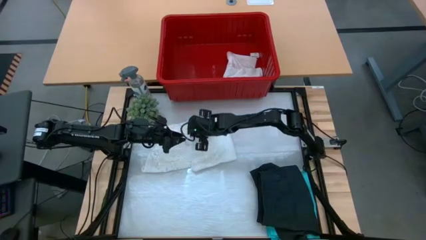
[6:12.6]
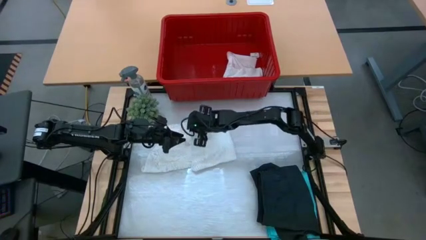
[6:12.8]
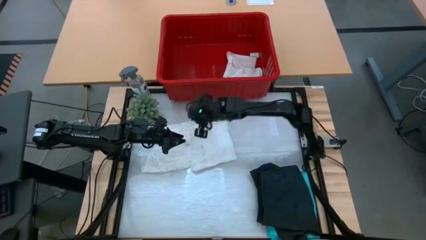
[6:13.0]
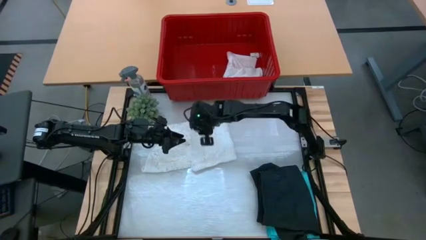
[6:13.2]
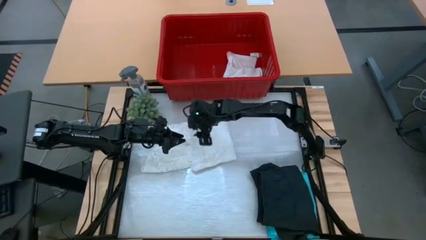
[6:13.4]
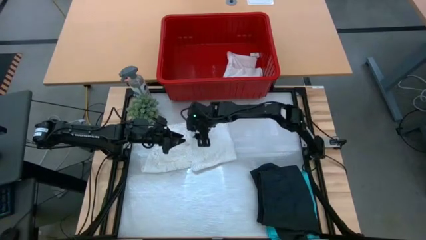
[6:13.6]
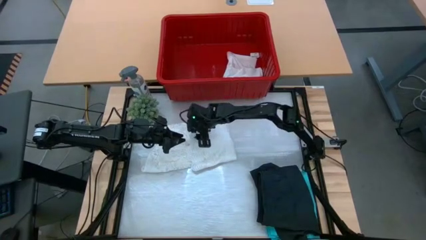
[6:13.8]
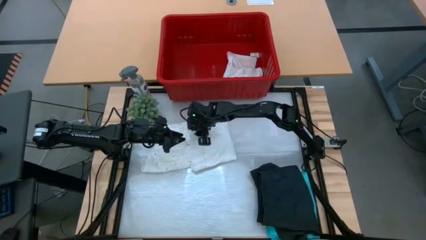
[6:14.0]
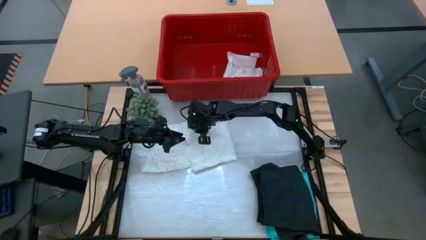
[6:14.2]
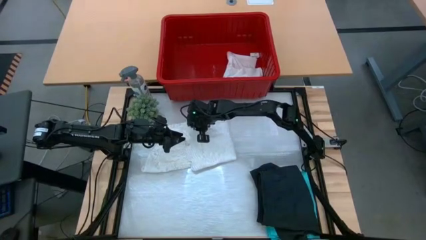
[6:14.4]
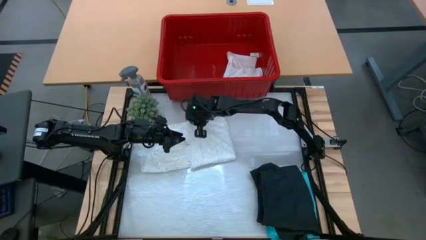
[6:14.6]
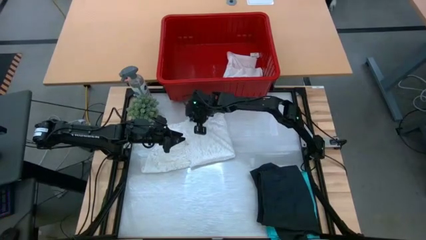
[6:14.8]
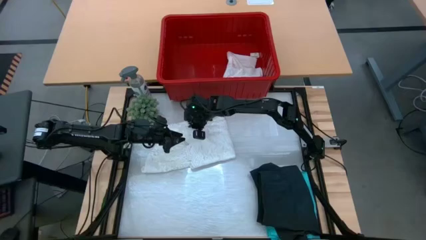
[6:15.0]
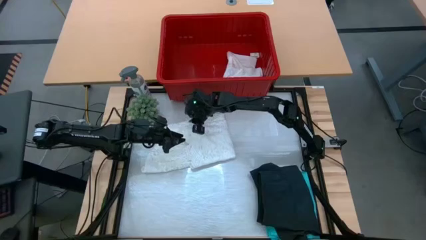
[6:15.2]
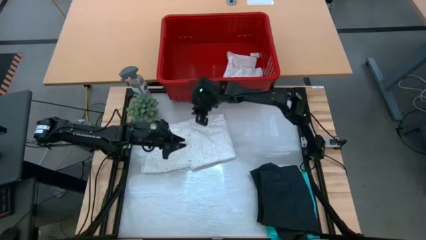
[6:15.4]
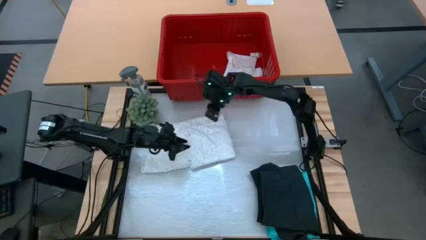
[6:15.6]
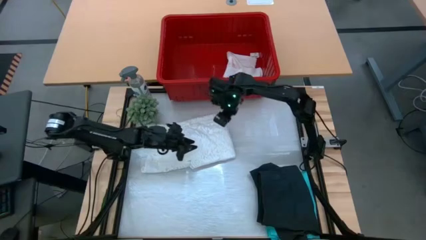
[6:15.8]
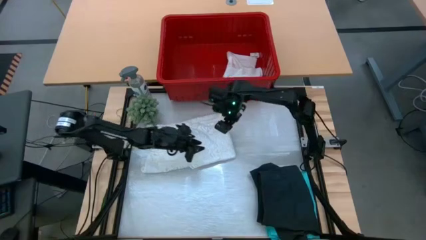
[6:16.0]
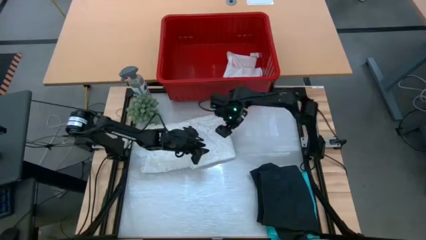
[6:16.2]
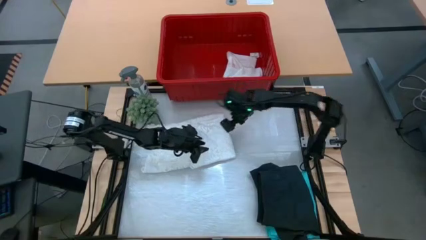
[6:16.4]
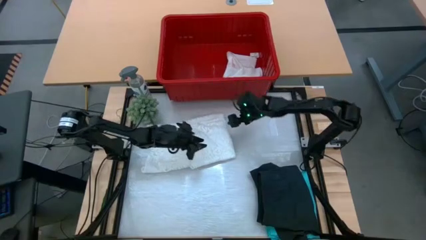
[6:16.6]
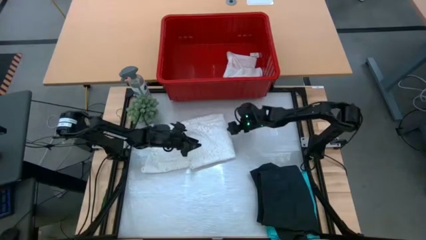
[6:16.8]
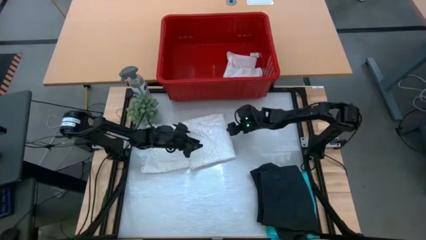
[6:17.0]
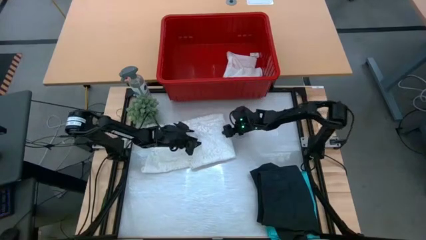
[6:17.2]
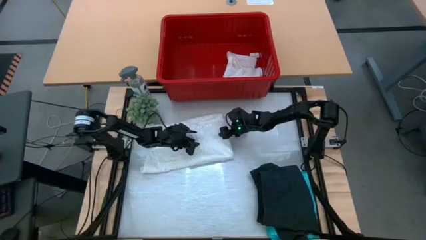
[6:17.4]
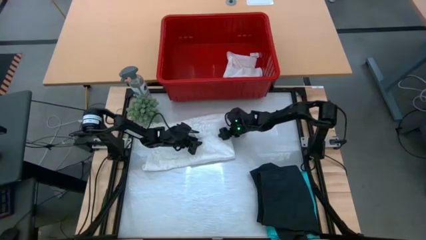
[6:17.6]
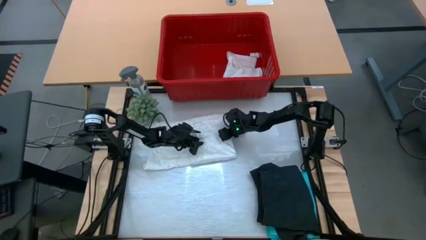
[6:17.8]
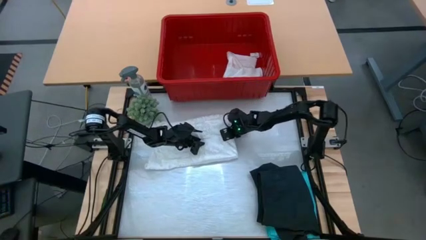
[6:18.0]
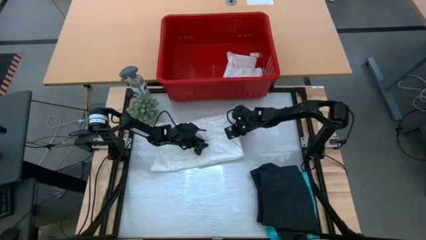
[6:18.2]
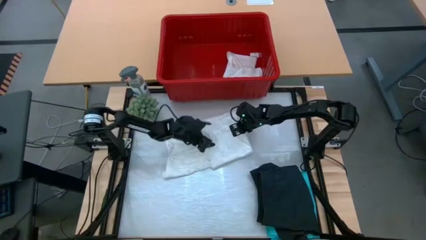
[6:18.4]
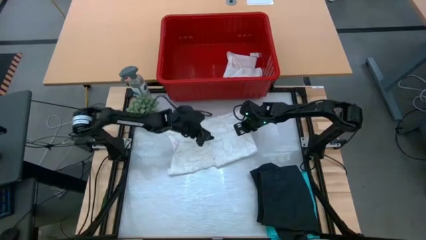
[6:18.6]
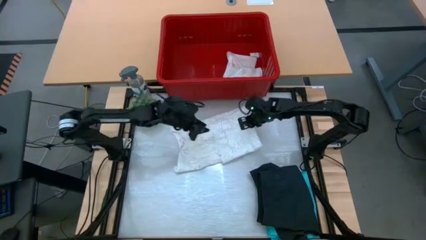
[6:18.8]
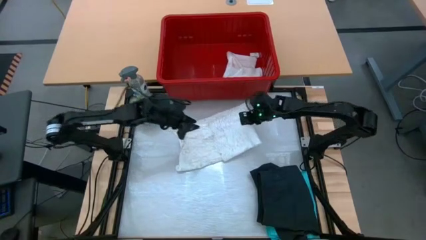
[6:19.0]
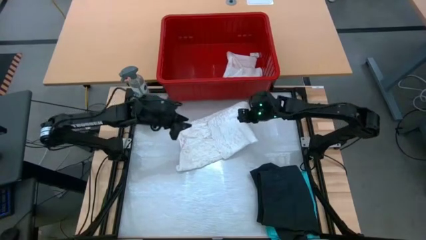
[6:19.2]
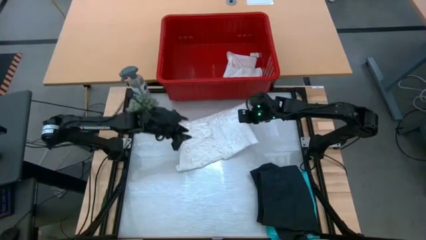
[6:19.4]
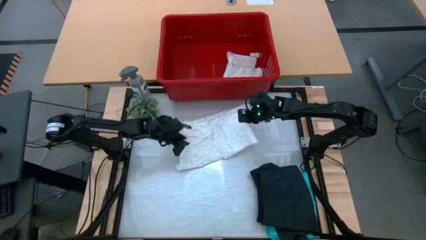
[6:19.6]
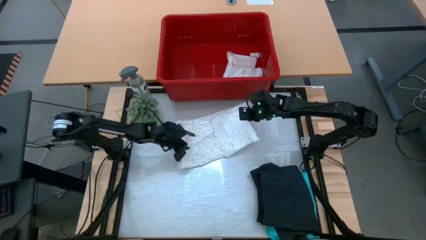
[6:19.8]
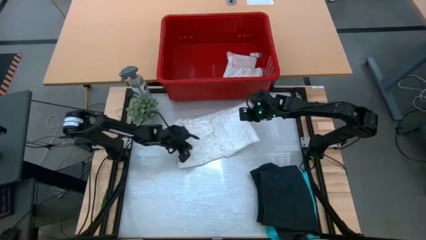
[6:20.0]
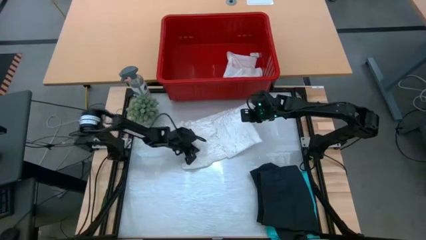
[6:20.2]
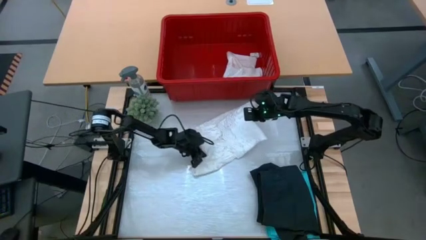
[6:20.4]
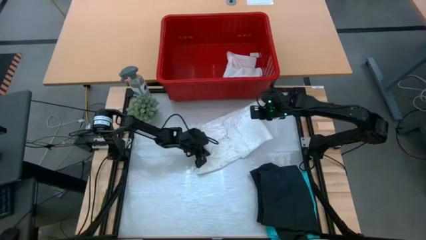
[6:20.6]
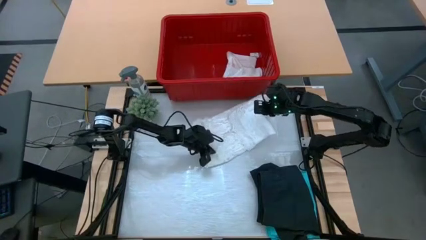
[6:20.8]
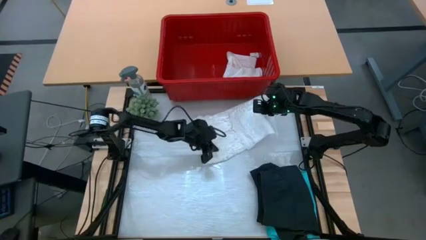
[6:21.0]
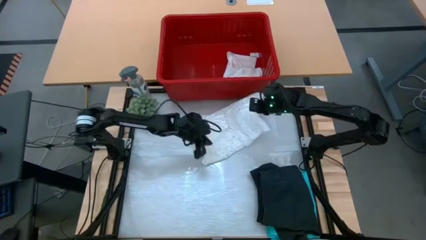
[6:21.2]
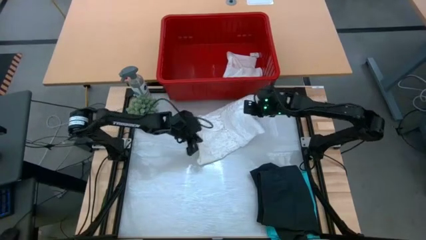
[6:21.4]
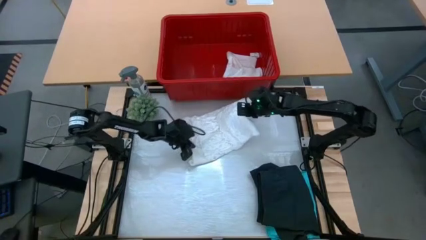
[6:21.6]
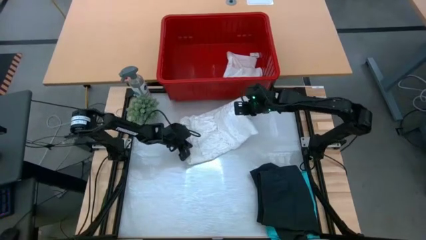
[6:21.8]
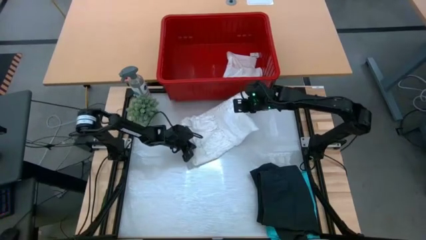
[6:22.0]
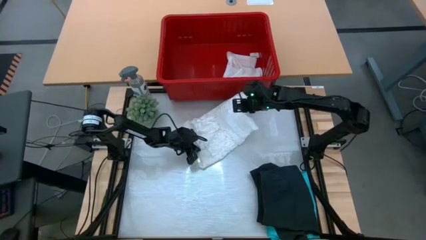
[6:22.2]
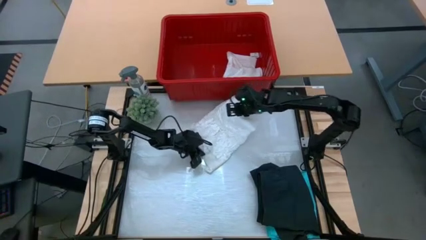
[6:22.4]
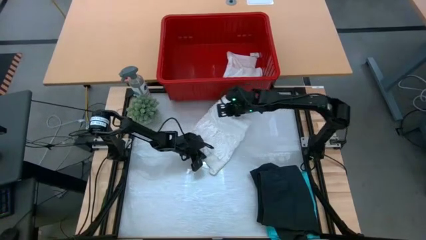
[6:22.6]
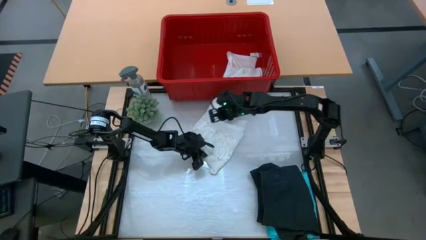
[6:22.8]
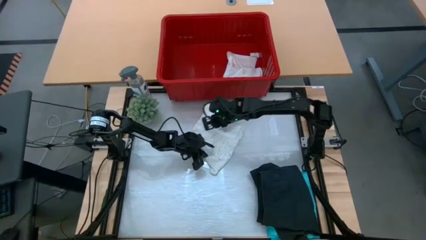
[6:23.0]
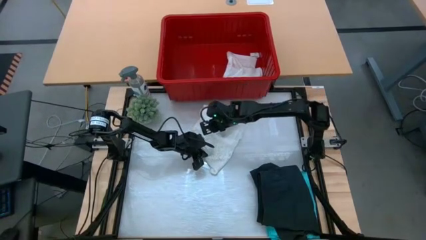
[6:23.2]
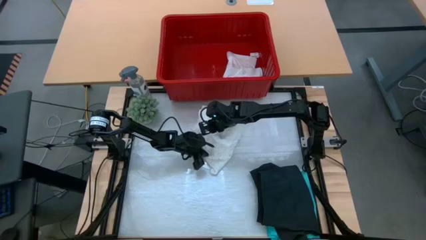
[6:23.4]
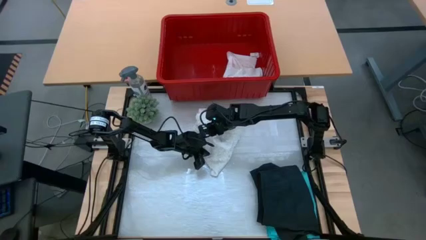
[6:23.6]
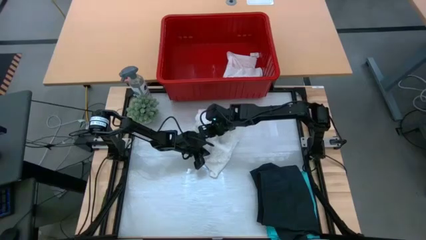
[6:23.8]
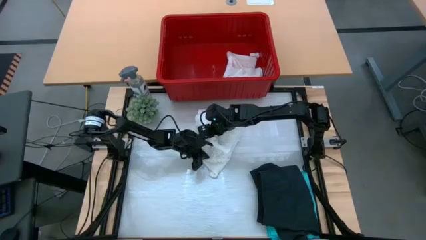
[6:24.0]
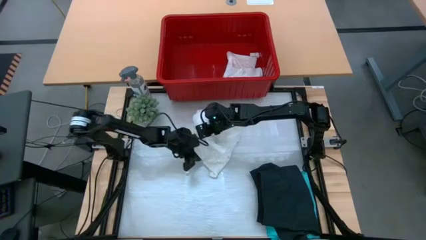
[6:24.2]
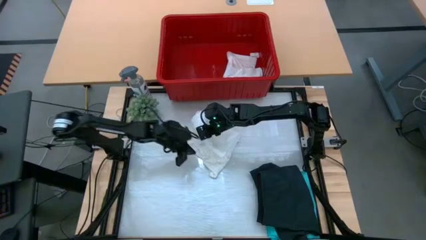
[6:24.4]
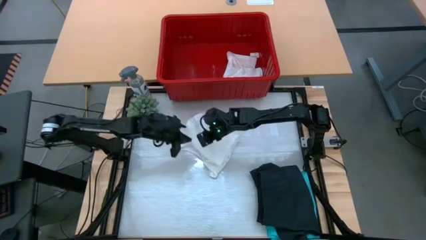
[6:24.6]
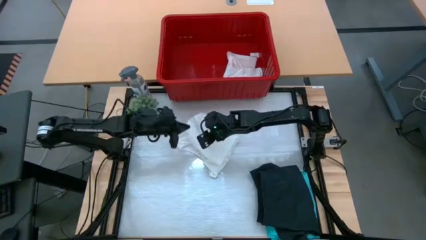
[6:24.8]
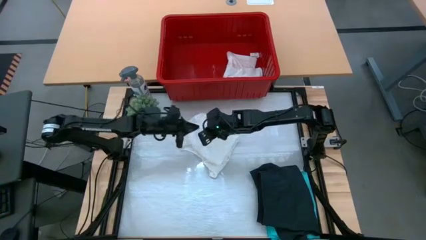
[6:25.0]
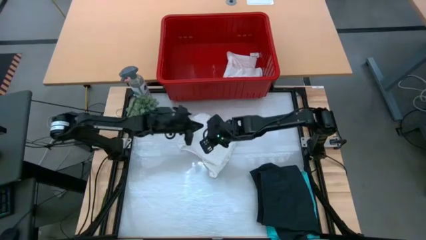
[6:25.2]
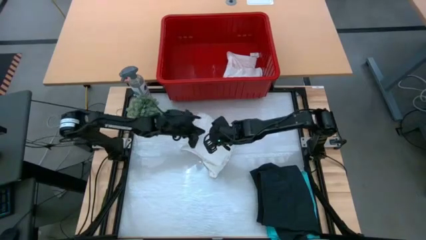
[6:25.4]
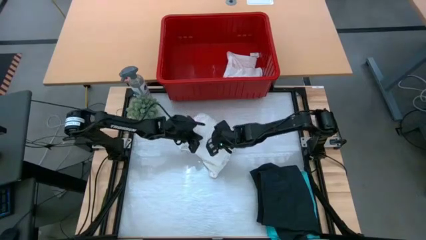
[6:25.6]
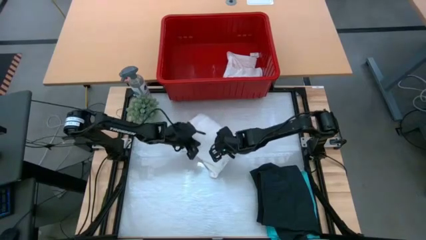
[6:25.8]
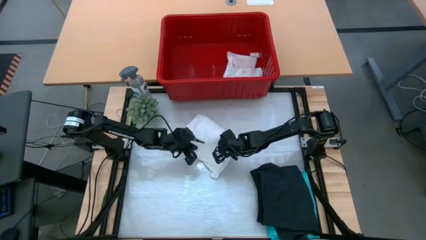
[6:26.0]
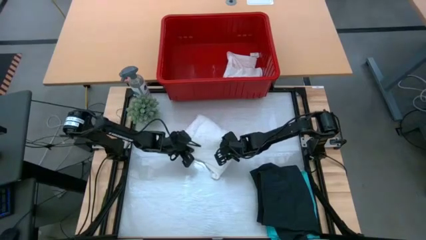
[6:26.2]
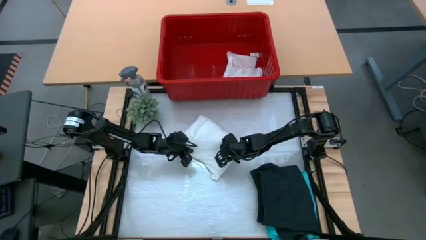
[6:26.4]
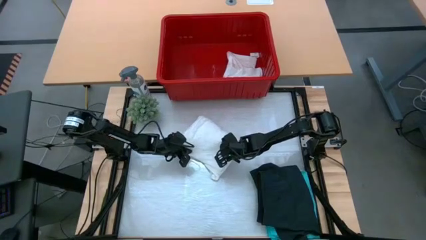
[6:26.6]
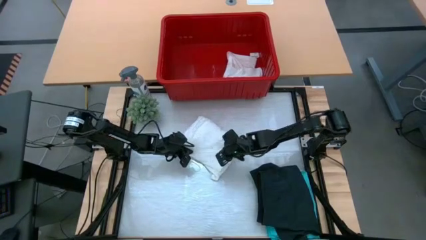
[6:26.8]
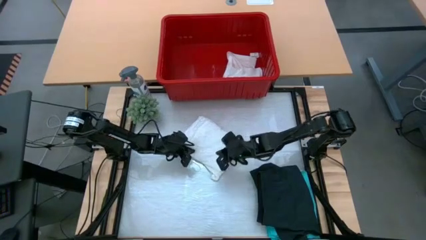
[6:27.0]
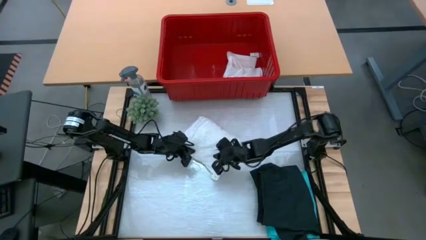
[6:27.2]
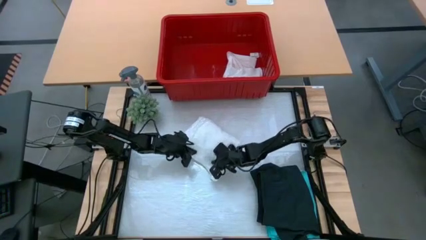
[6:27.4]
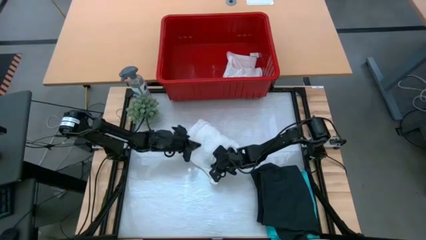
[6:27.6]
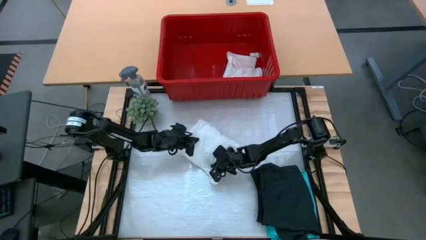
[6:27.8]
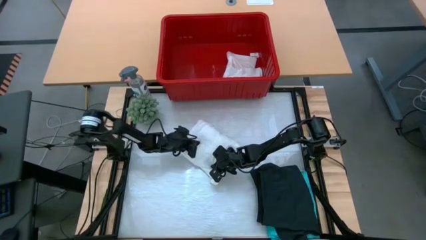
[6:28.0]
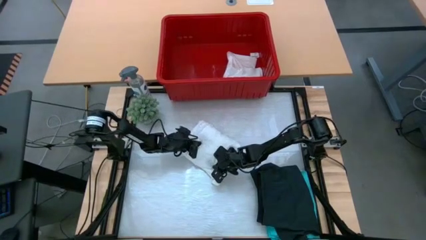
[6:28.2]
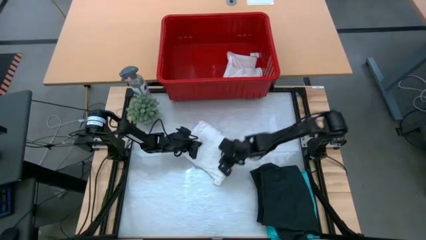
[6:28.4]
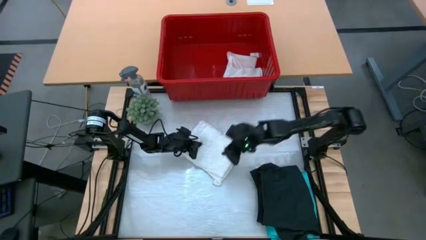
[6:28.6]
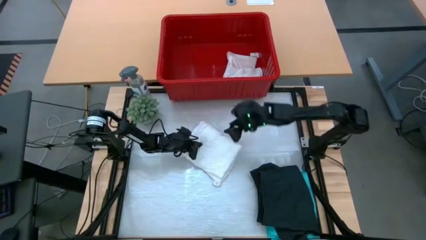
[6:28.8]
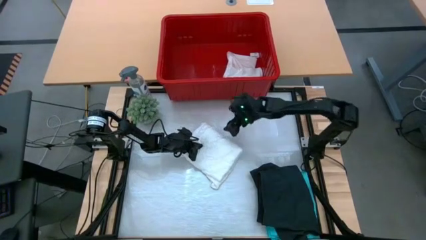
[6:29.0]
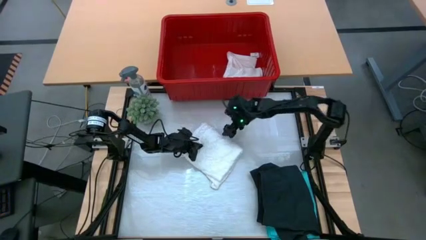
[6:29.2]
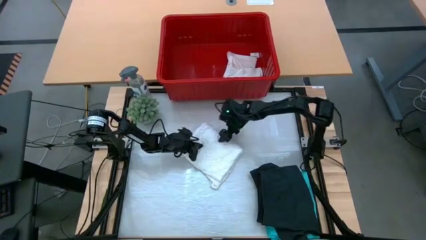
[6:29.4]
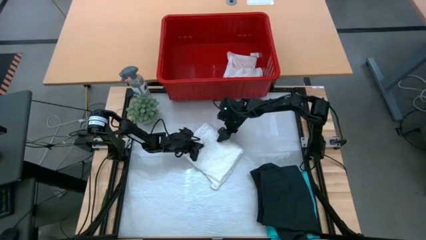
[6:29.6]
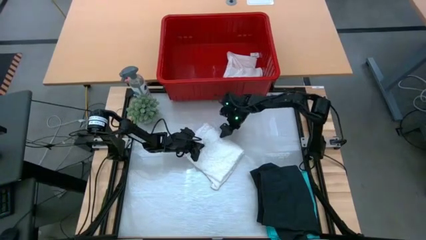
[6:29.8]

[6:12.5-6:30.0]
Task: Fold Laundry from Bin
Fold the white t-shirt
